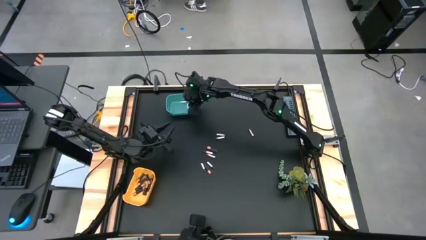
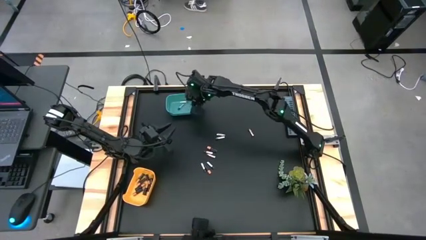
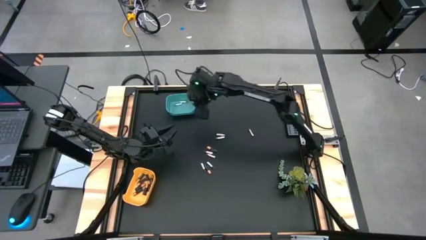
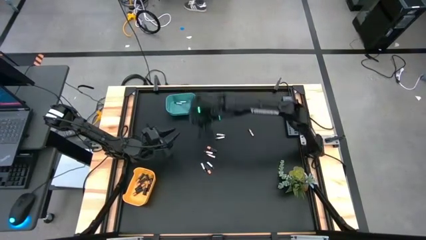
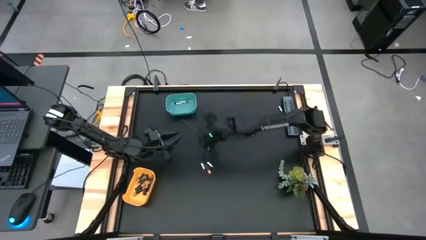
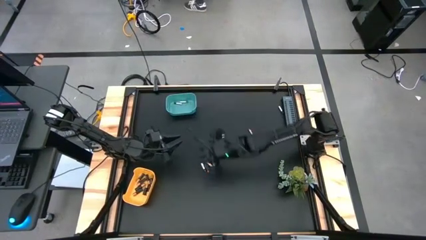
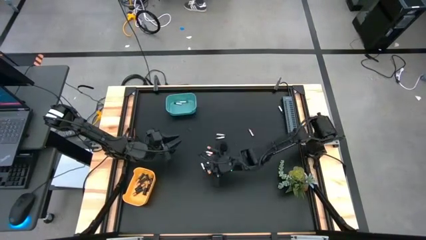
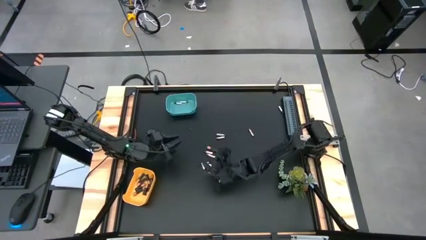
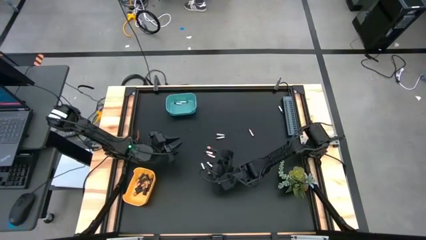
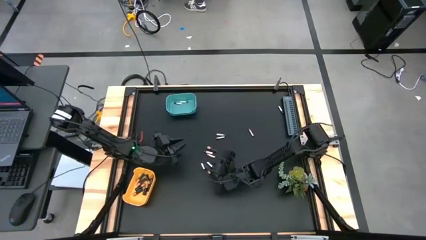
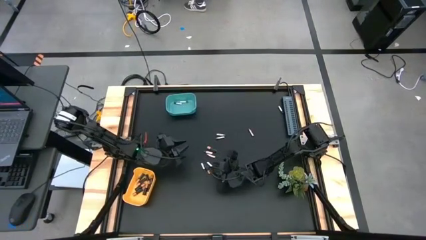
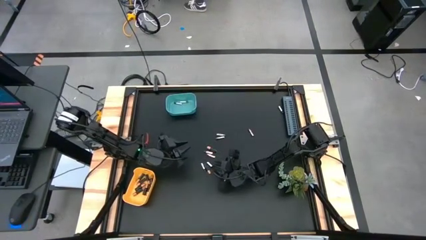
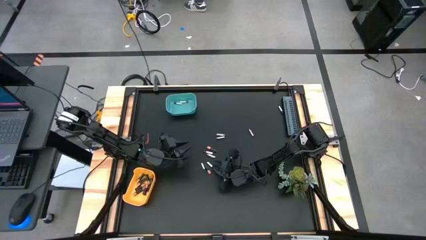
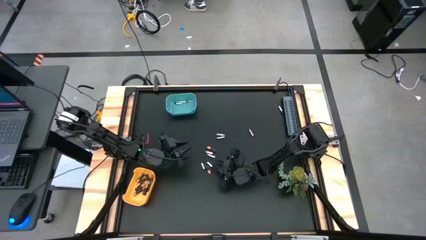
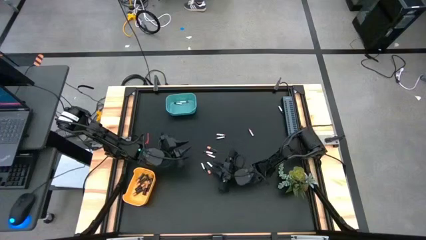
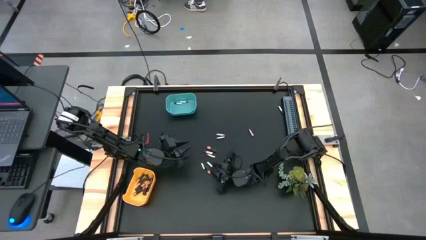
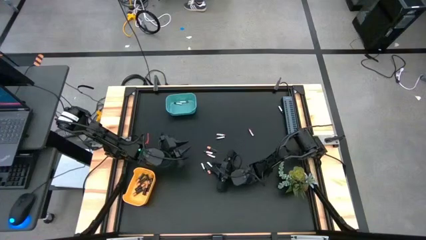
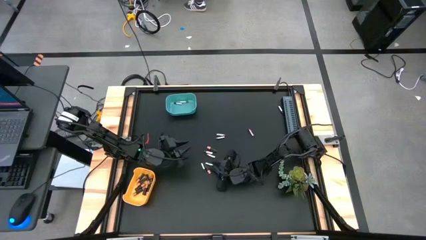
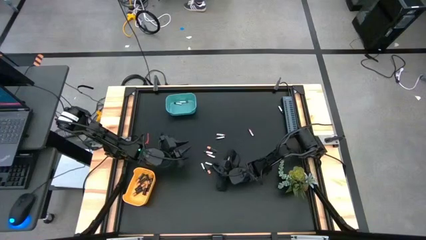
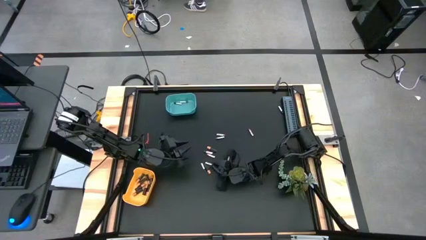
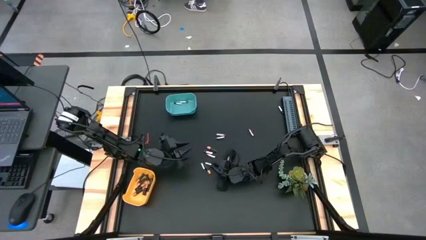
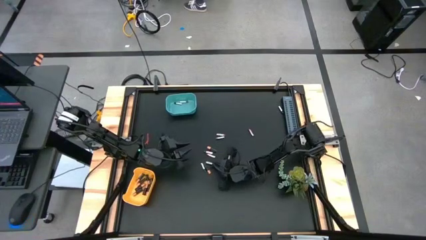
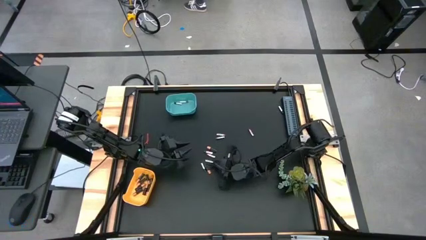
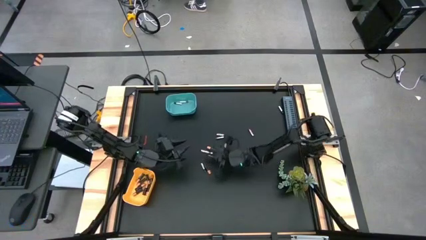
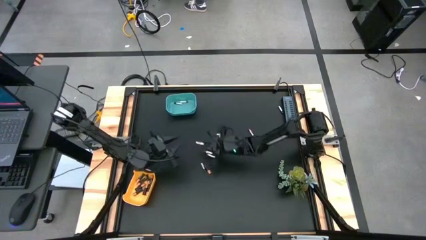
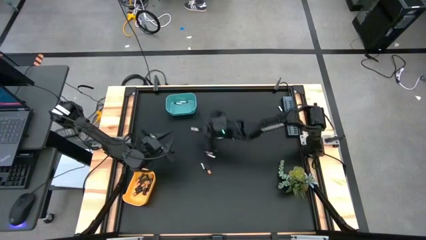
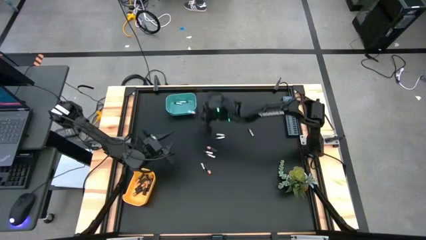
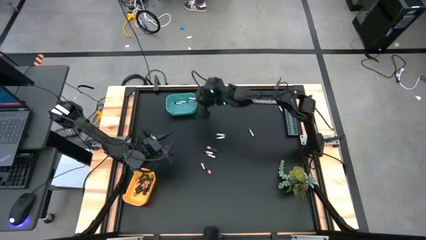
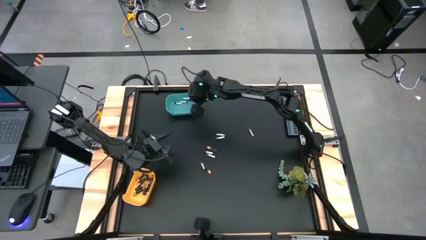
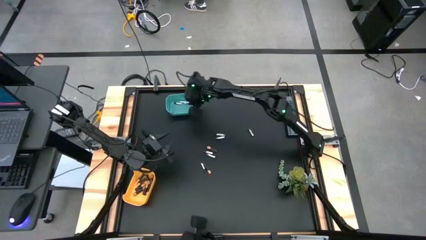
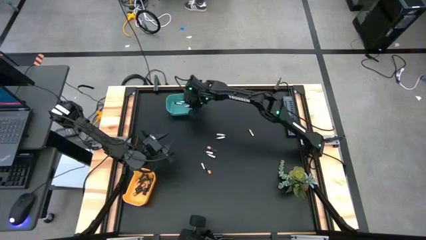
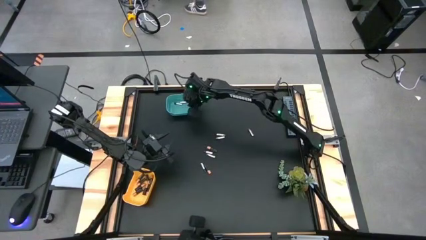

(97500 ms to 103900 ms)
Task: Sort batteries
Put the silver battery into the green bin

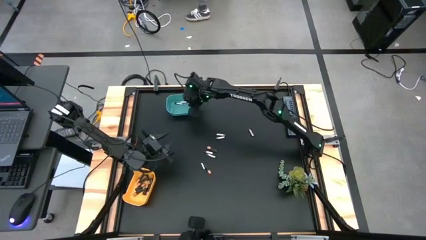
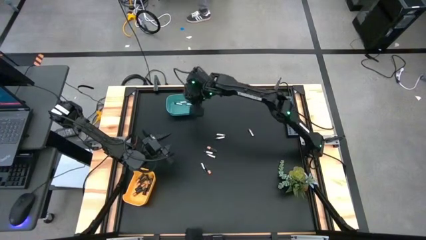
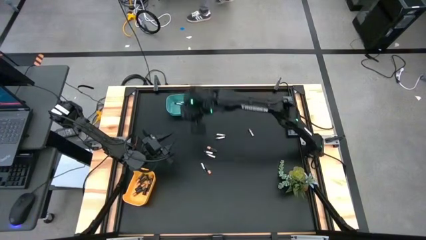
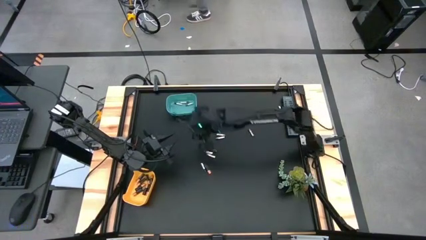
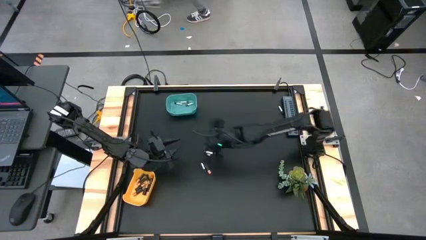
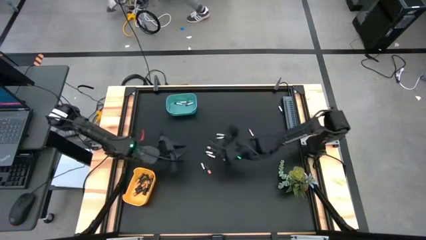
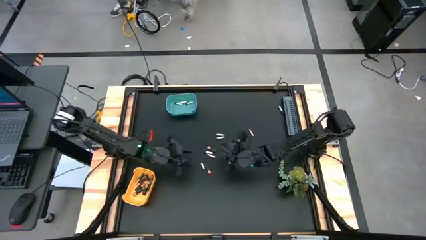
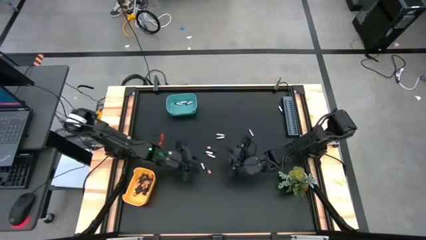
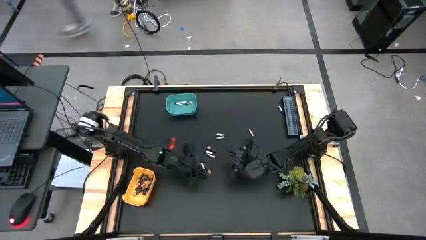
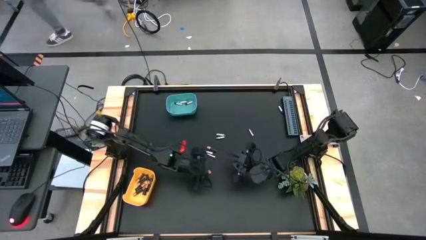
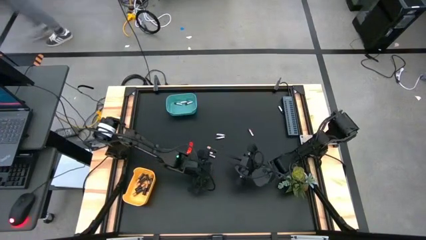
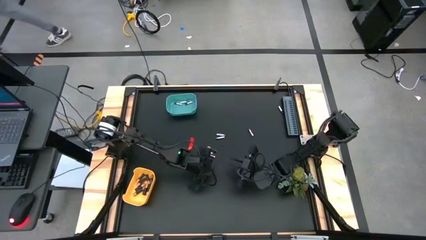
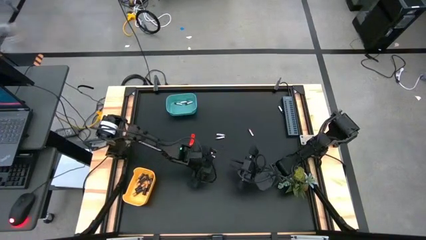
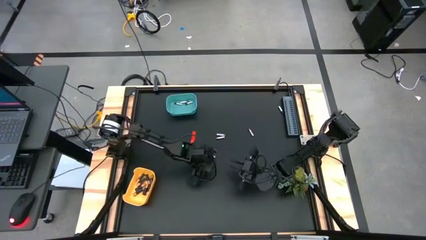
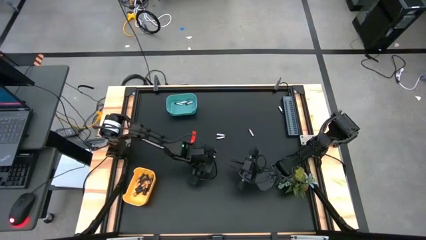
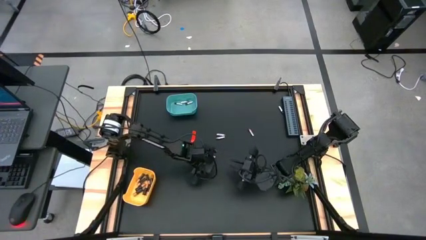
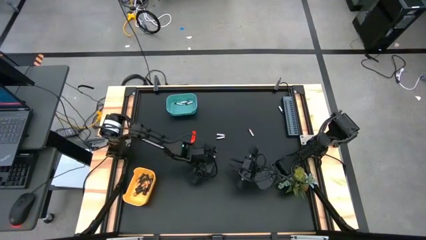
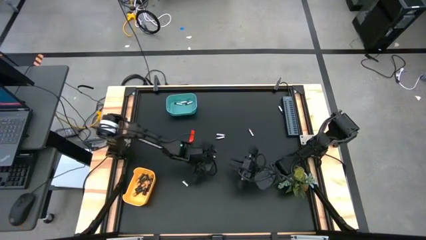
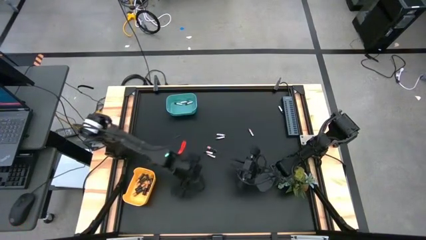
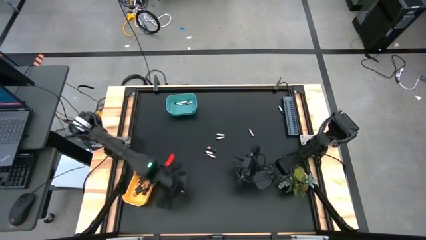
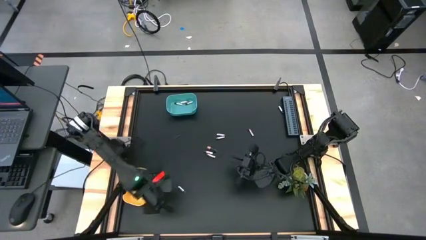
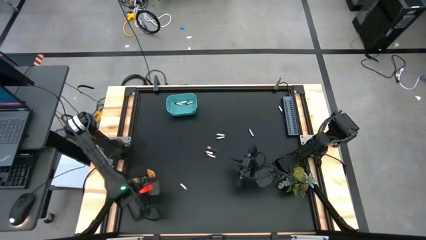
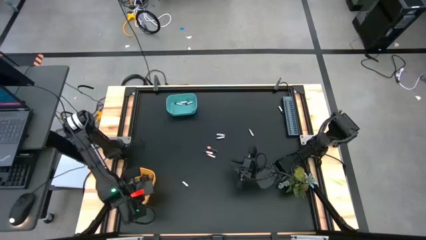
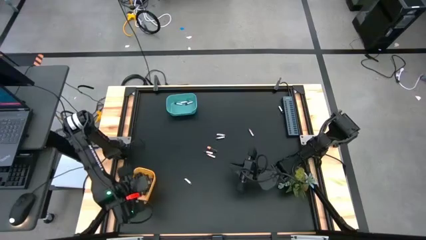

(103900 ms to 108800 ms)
Put the black battery into the yellow bin

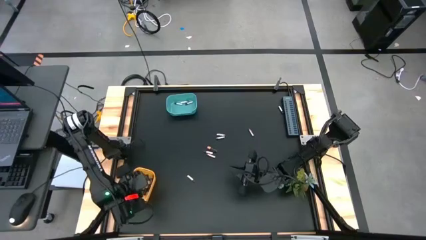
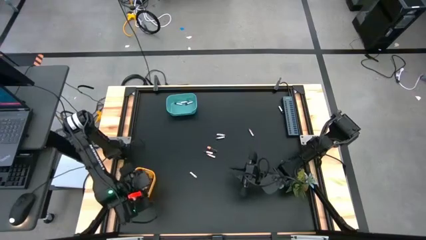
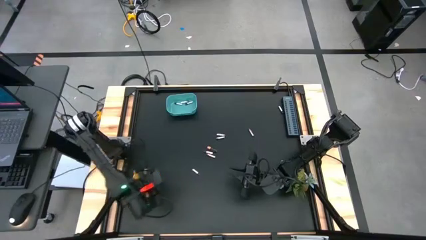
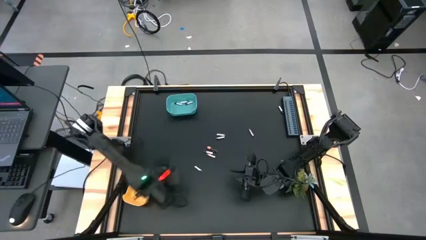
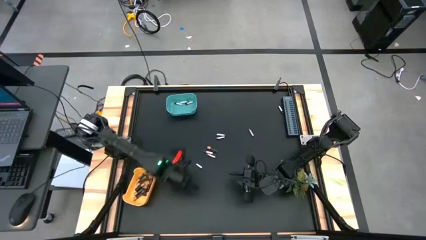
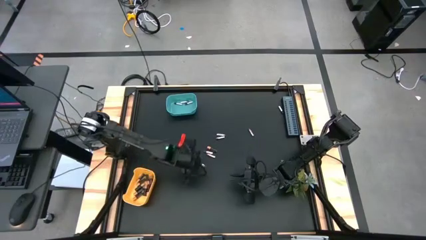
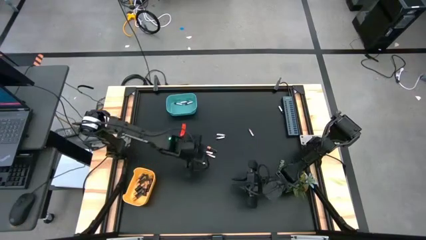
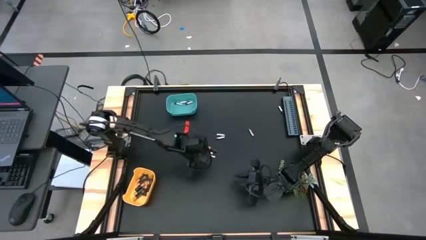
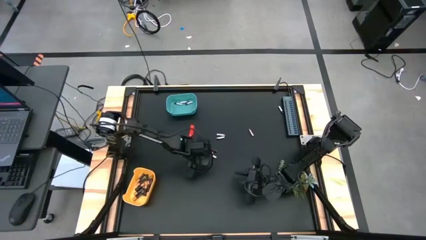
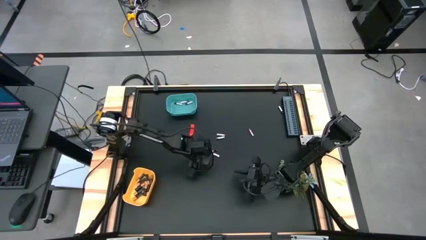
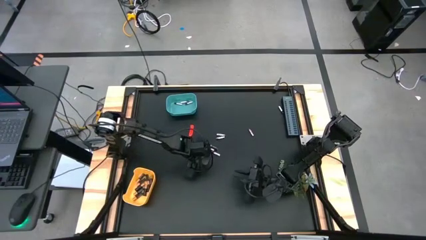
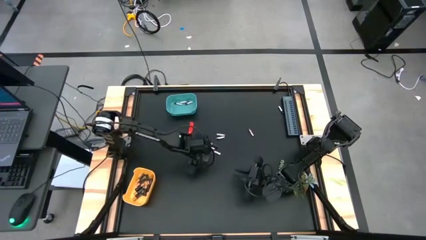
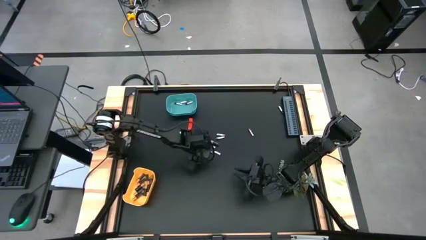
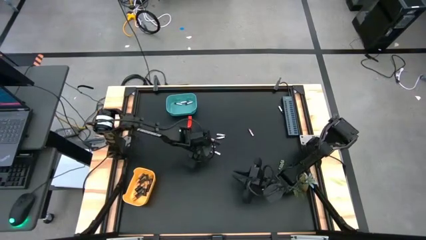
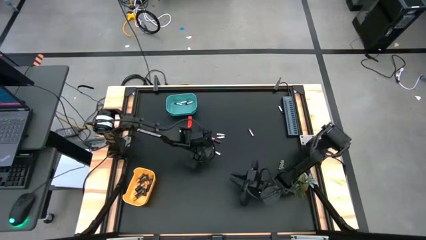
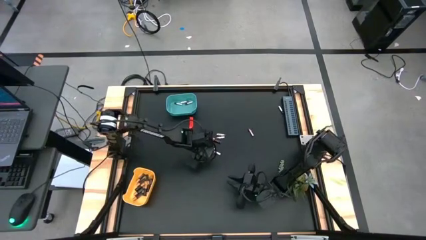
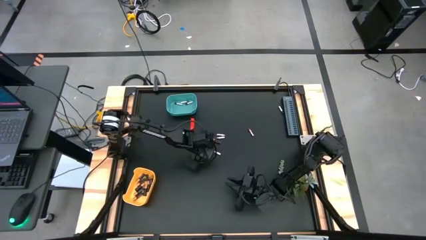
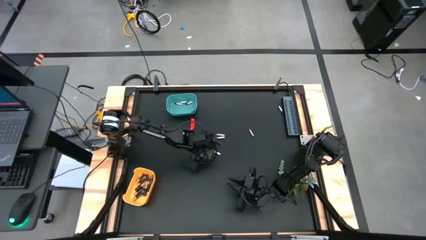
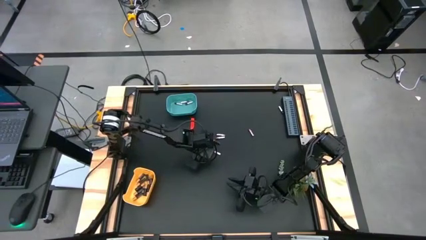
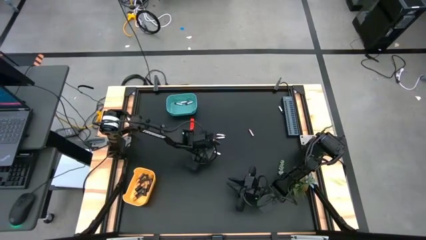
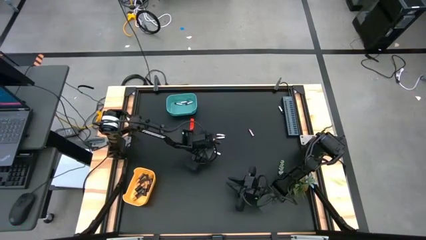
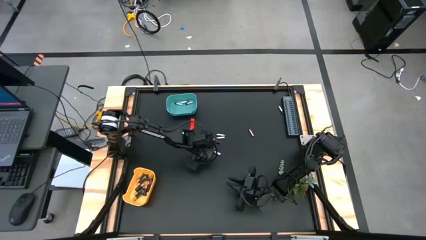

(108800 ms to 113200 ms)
Put the silver battery into the green bin

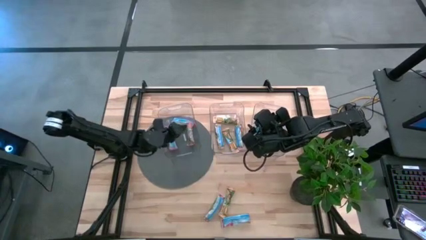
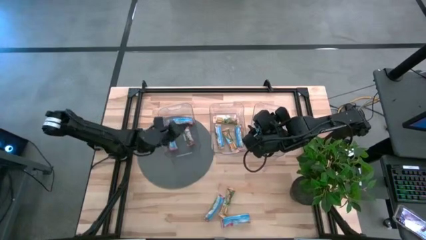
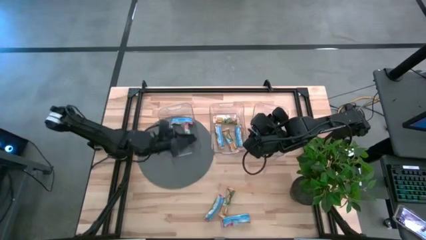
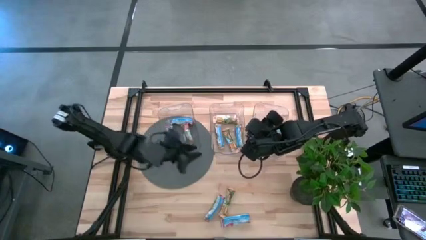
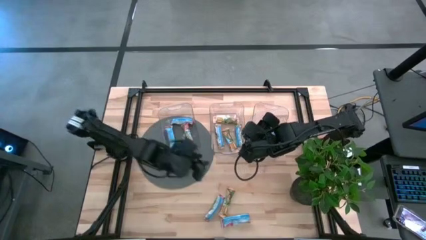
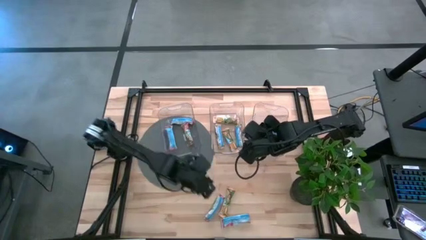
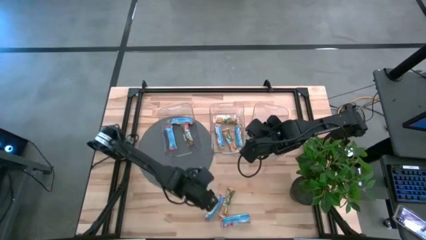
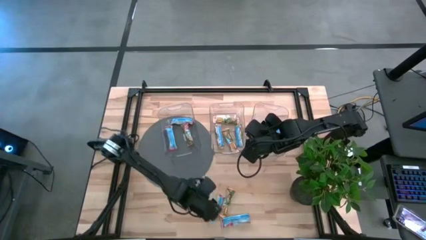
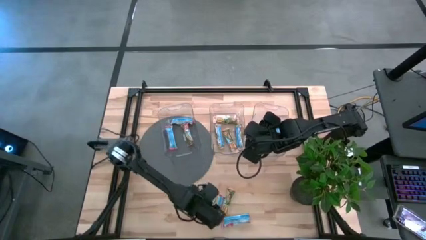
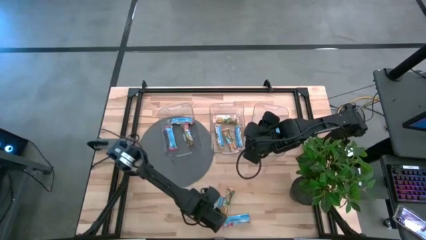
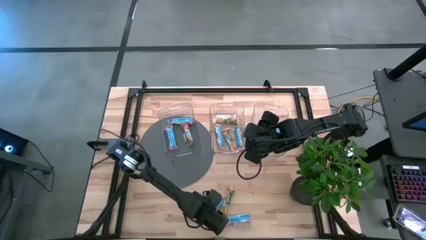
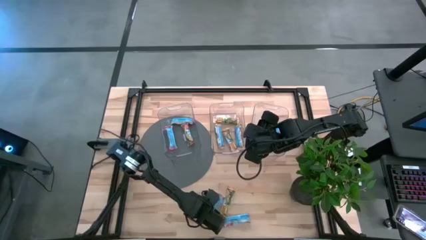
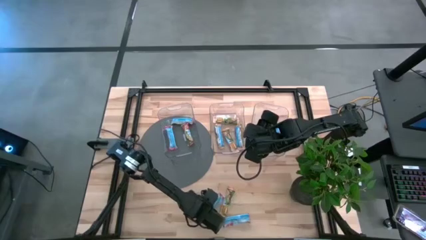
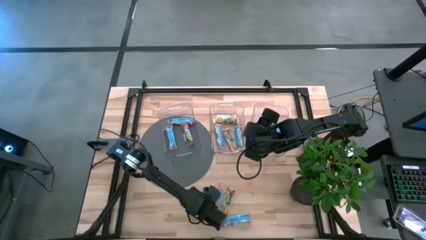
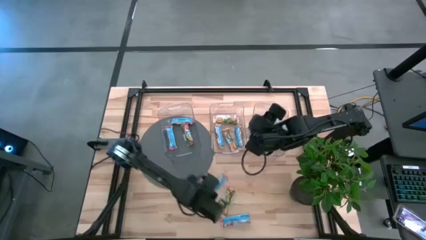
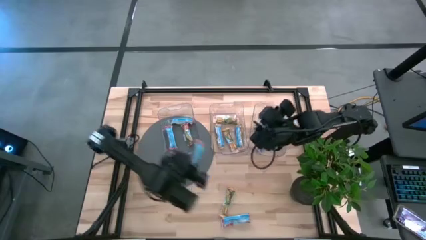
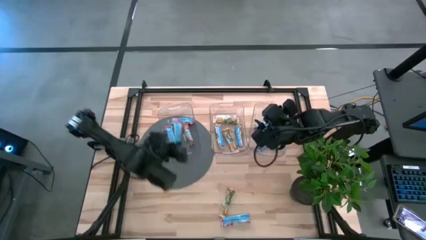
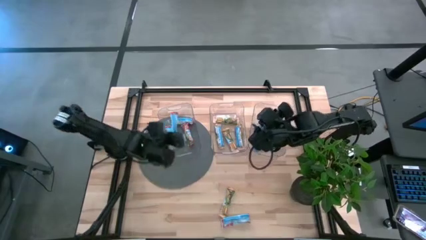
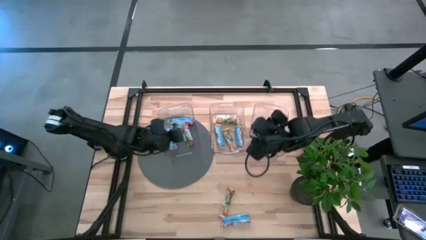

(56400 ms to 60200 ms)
Task: Pick and place Granola Bars by type
Put the red granola bar into the left transparent bin
